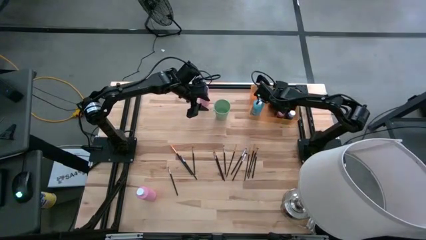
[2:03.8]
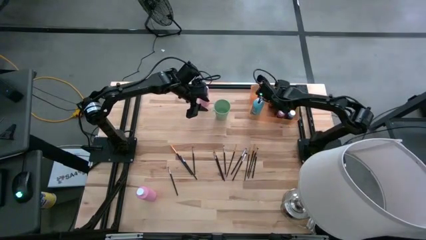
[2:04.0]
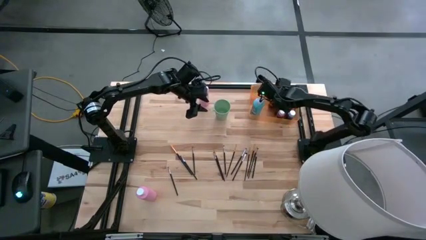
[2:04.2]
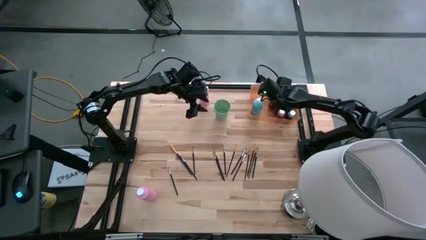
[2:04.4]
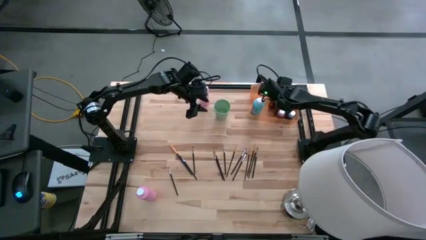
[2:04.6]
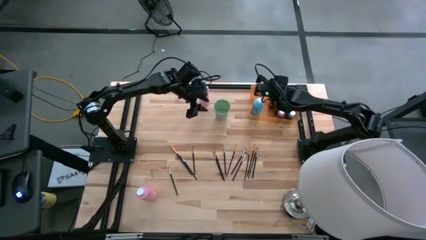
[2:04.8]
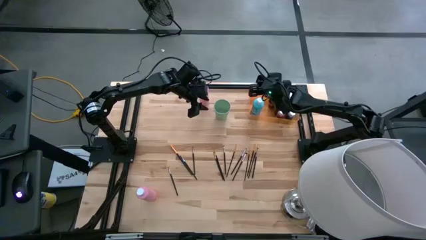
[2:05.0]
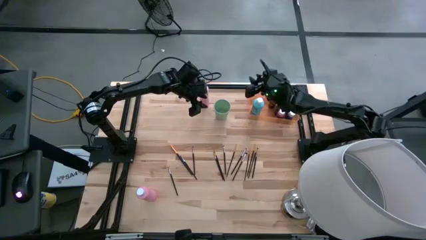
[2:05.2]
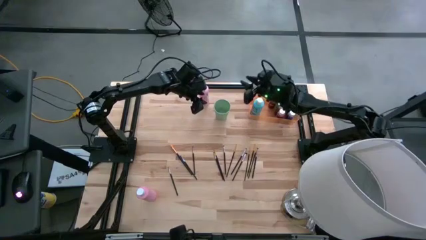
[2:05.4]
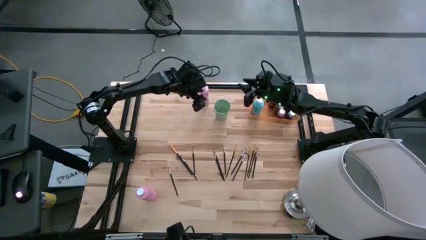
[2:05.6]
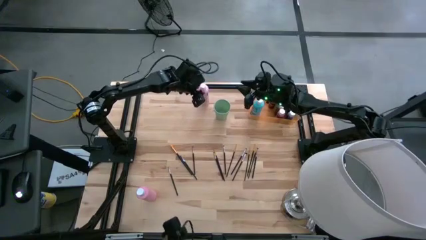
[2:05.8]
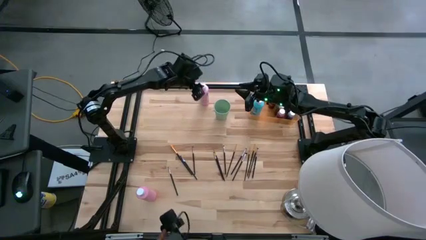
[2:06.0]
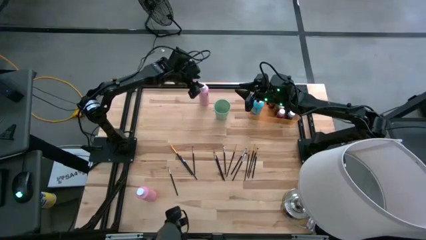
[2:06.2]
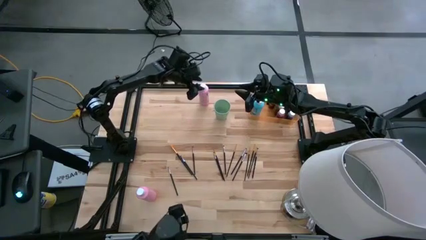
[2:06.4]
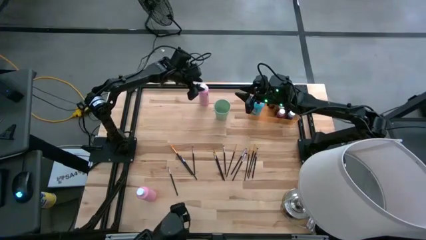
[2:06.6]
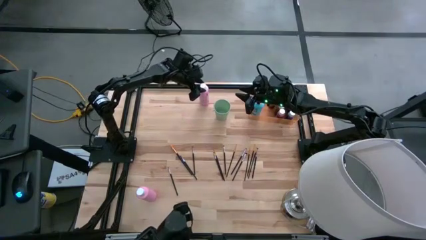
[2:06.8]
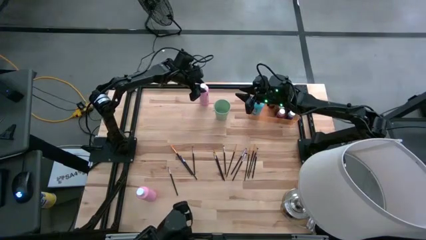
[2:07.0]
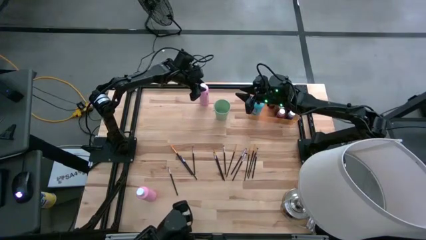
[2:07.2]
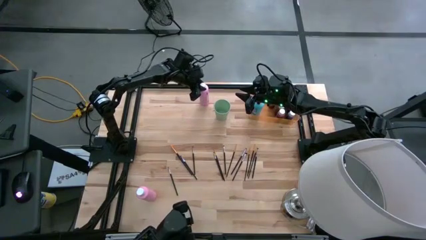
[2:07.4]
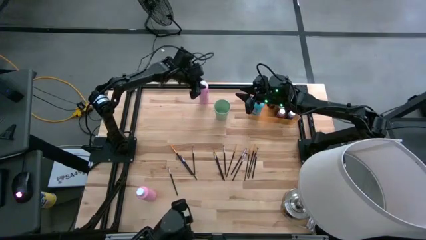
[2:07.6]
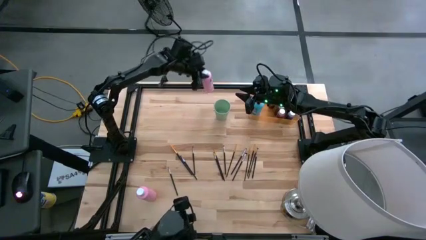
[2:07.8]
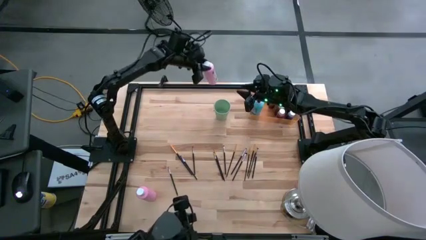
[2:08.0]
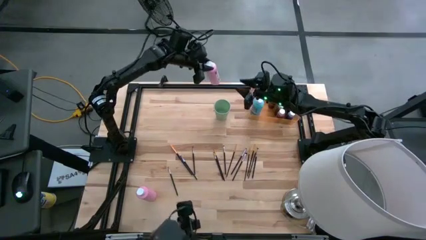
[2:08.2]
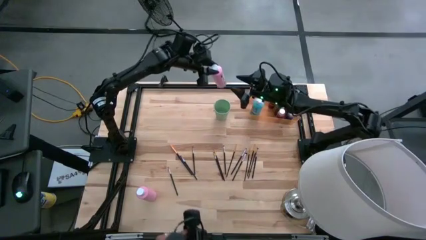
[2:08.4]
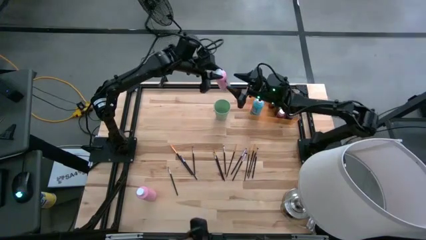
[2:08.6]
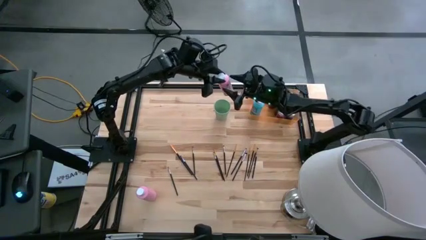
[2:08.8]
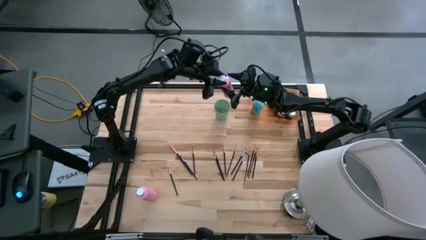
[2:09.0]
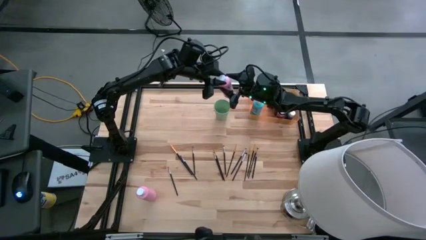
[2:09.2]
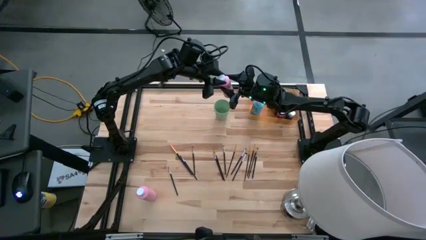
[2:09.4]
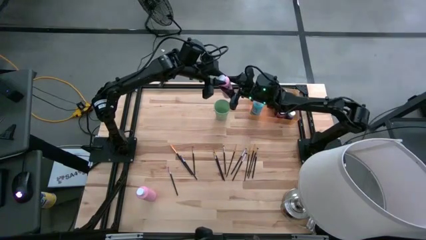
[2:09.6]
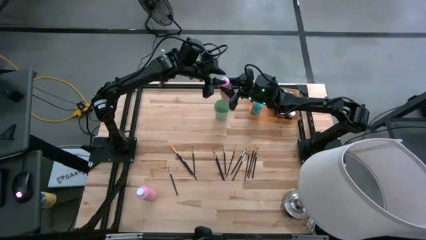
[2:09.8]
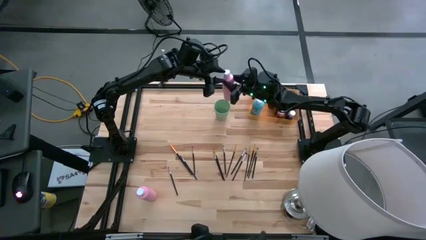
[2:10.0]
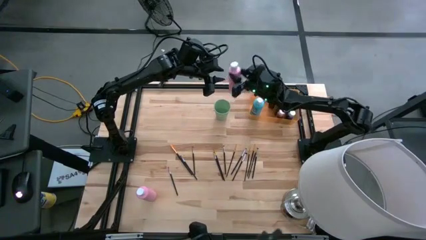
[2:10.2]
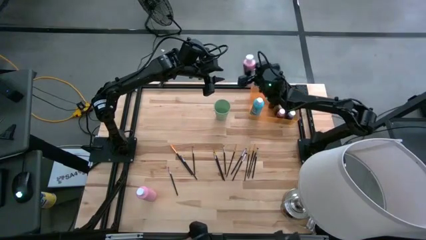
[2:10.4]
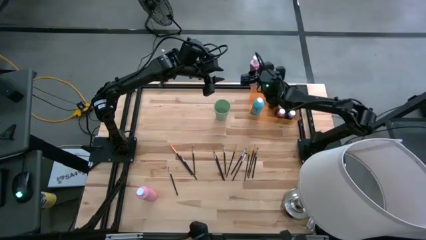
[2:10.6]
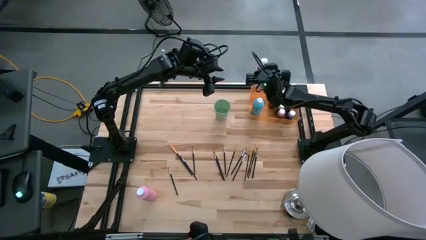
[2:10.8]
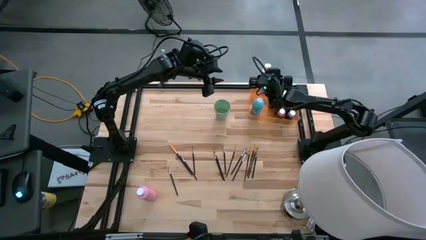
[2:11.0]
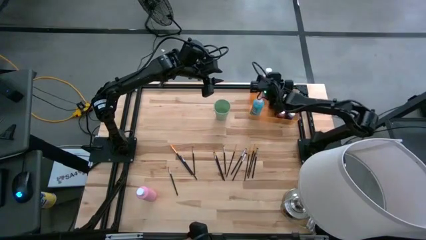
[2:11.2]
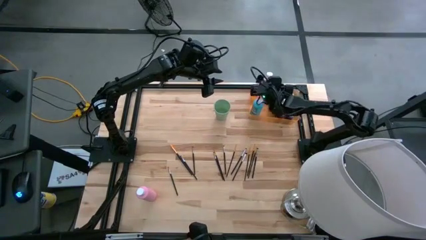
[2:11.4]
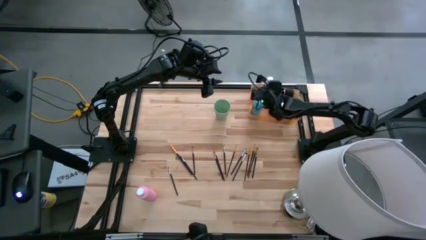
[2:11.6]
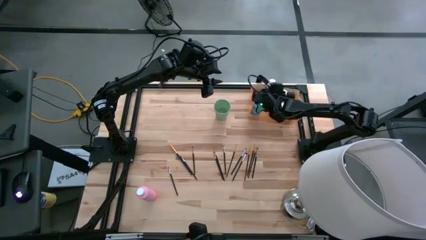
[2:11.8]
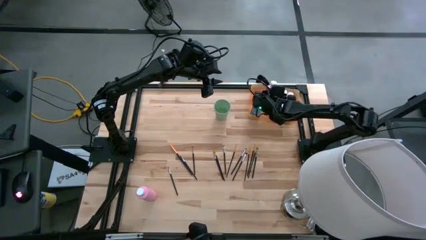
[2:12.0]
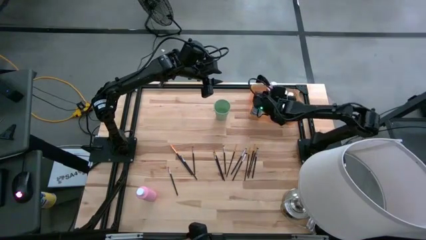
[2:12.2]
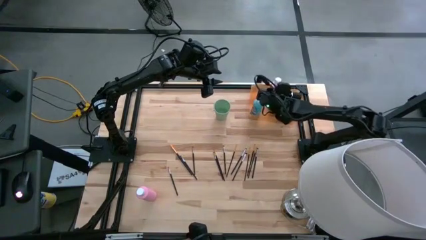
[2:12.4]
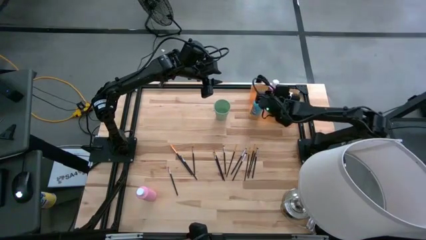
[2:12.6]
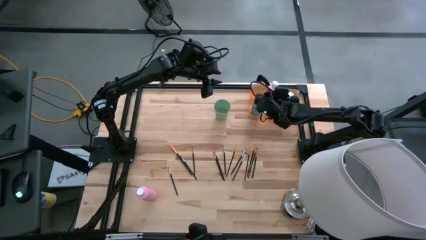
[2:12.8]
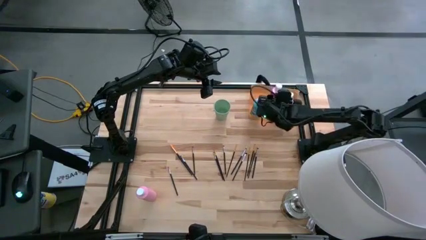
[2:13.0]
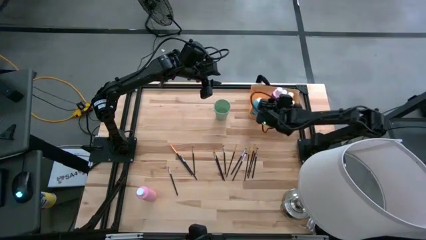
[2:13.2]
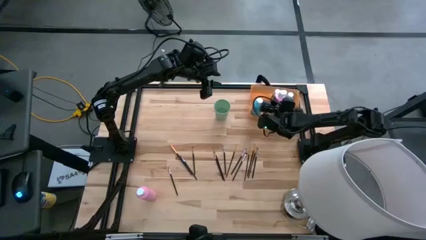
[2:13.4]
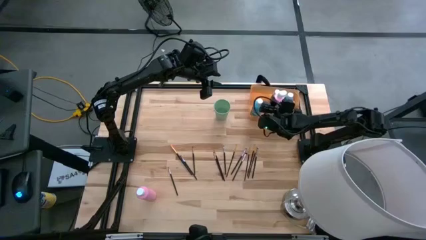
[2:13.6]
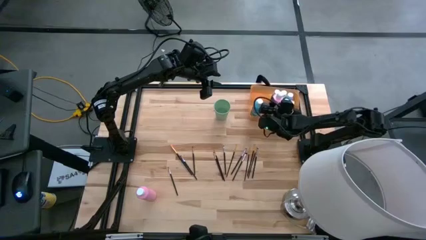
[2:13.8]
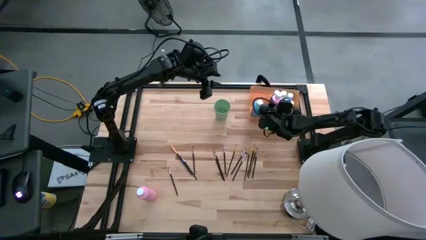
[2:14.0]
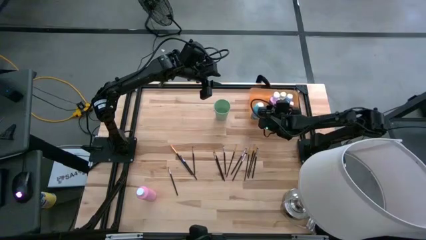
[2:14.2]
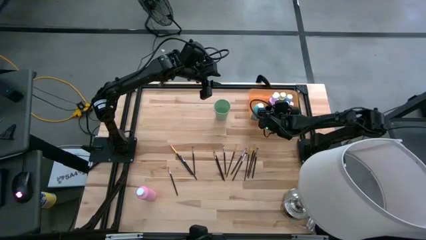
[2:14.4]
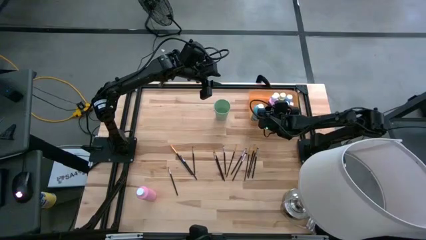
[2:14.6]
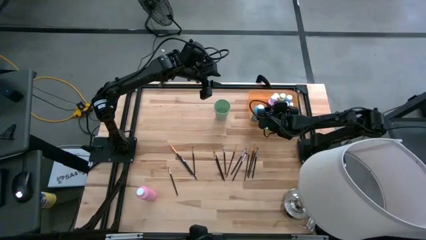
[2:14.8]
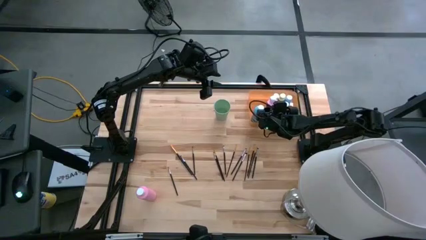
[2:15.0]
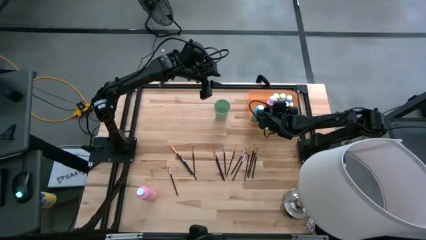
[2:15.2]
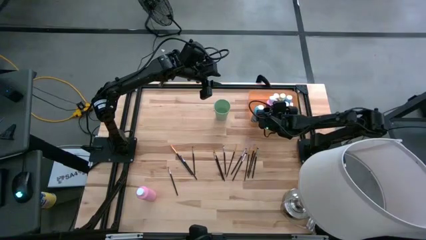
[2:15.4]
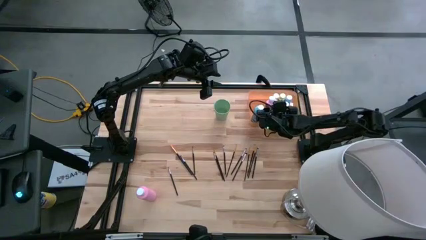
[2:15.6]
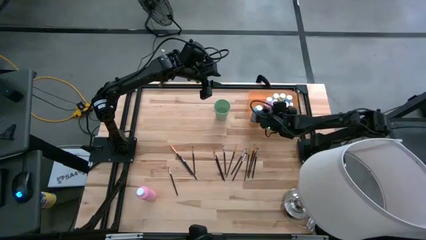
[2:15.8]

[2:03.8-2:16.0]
Task: Pick & Place Paint Supplies
Put the top large pink paint bottle into the orange bin

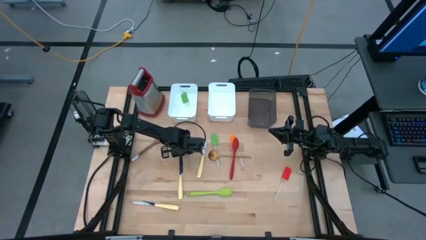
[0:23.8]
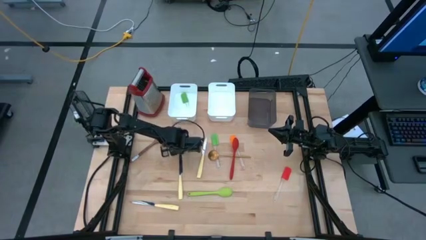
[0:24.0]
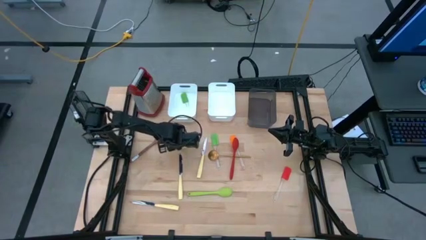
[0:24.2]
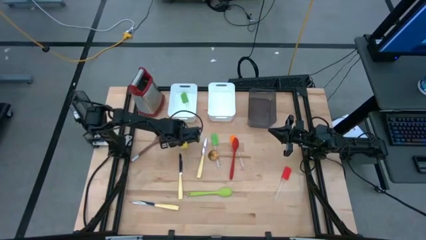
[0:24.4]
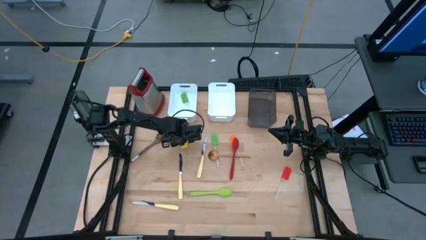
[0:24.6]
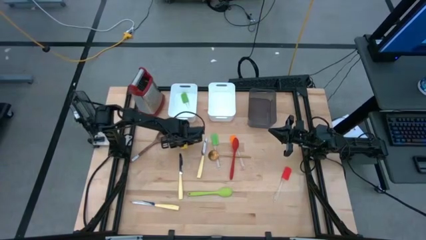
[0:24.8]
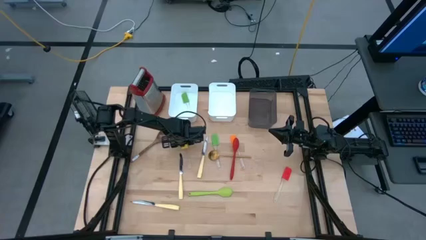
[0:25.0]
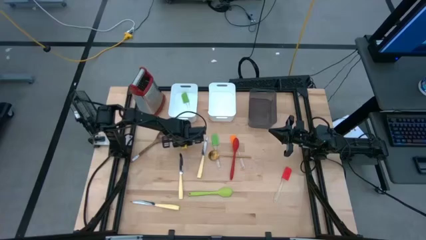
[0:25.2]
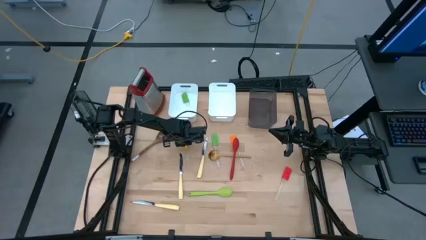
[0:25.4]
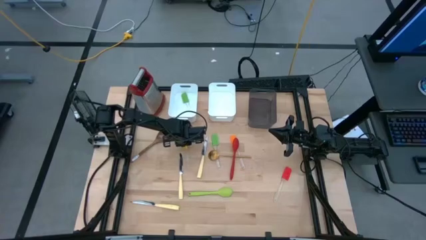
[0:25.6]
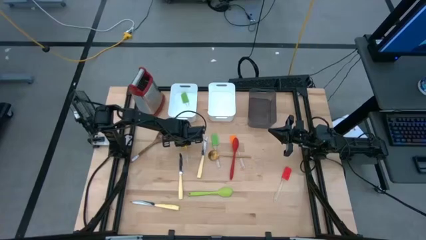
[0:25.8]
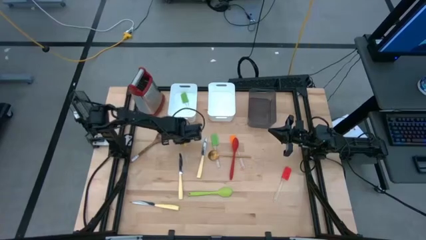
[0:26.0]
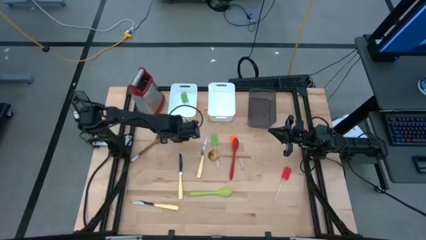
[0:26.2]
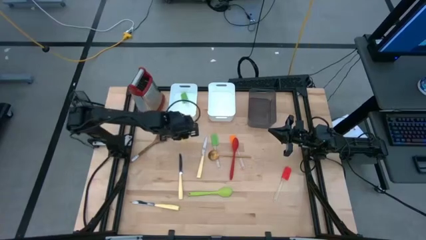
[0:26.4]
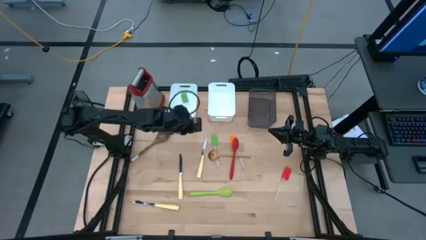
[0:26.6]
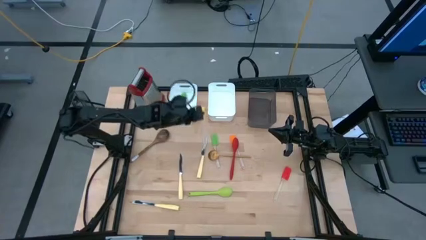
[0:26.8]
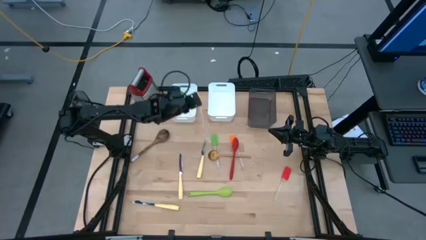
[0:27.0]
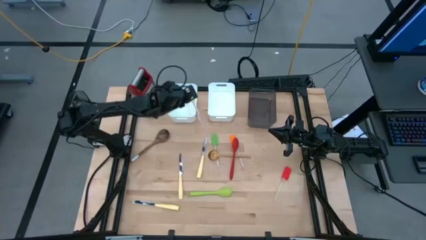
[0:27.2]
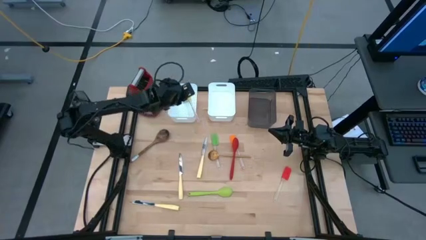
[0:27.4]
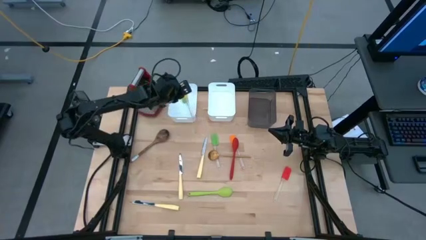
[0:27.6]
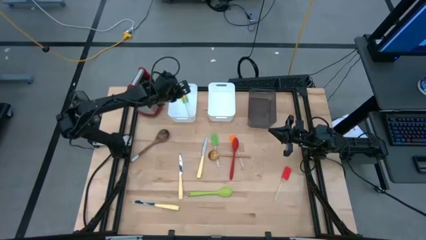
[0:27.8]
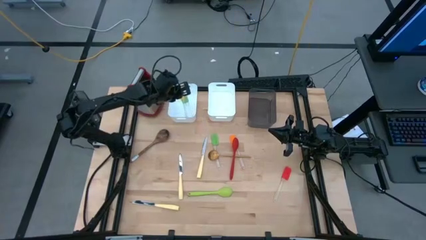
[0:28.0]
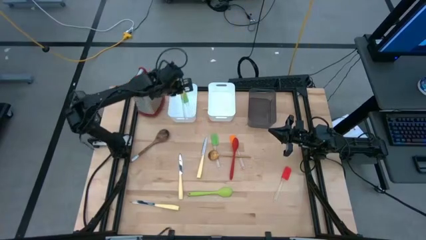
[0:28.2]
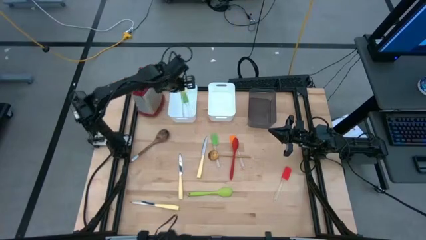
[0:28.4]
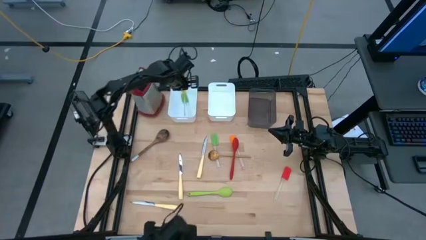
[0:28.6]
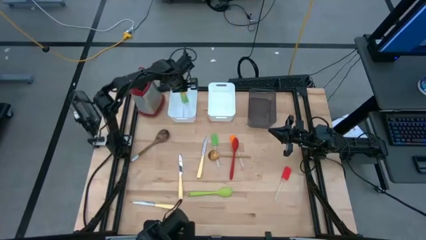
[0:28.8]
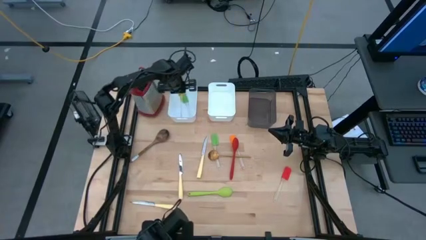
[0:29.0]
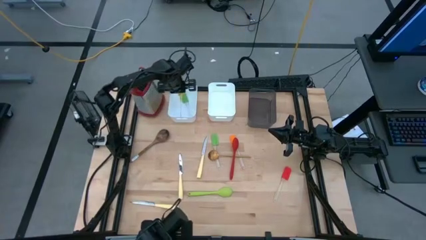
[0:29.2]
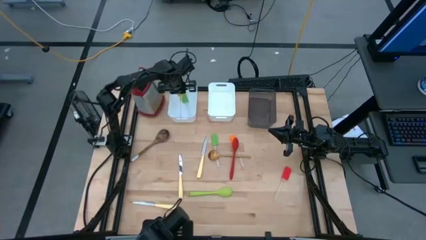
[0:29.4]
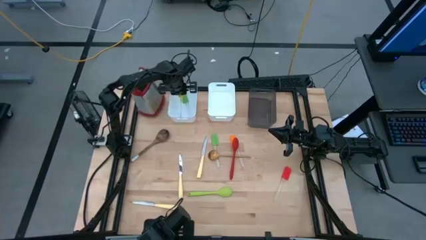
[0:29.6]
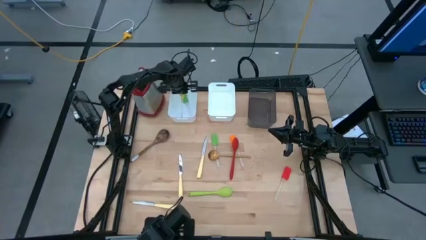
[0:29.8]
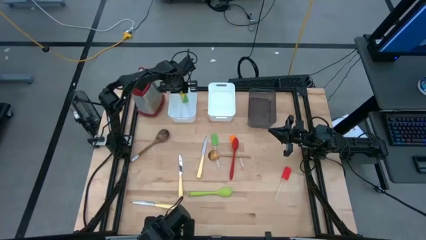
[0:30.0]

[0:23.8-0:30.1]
Task: Pick & Place Kitchen Items
Put the yellow spatula into the left white bin
